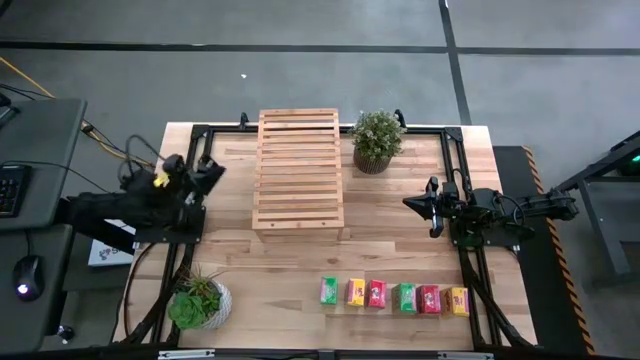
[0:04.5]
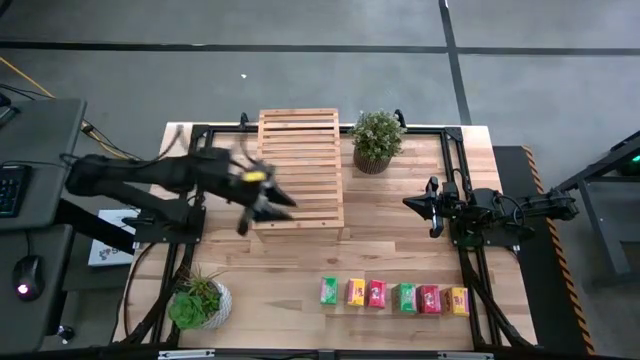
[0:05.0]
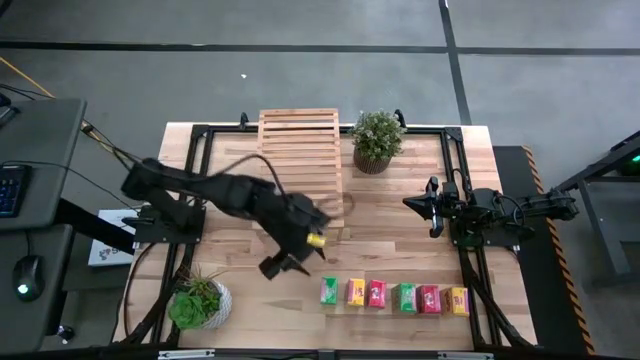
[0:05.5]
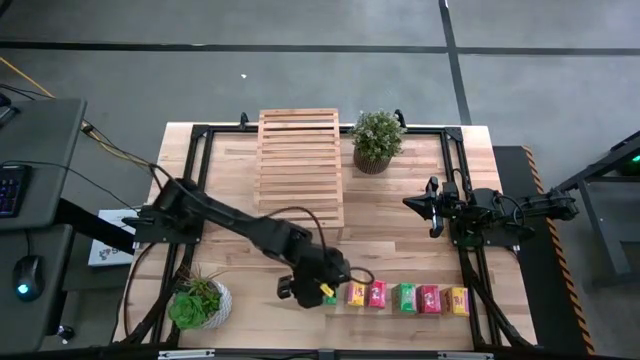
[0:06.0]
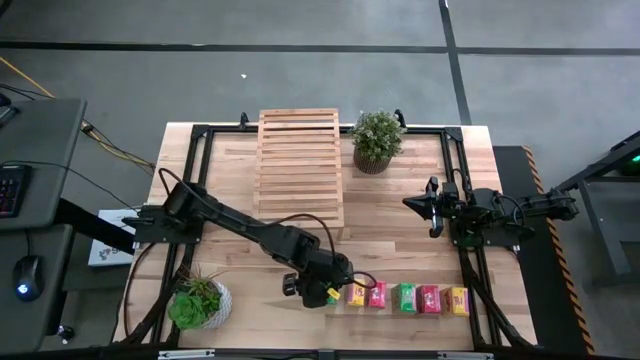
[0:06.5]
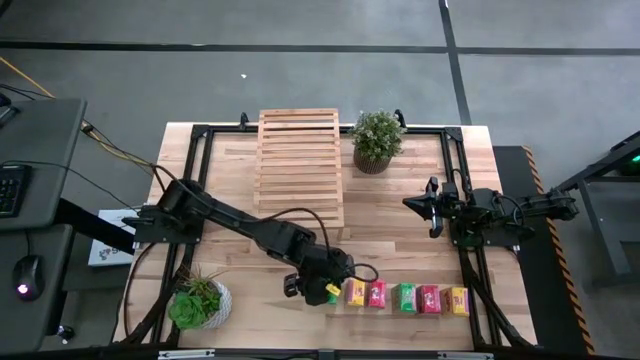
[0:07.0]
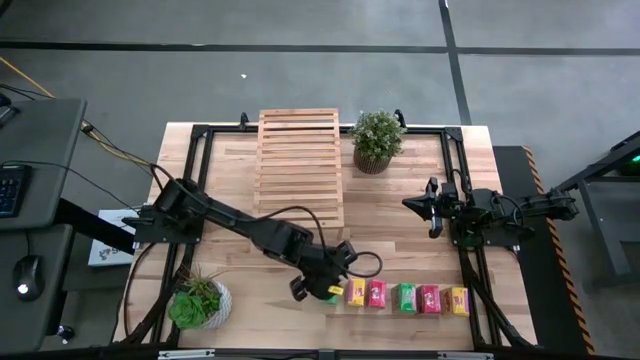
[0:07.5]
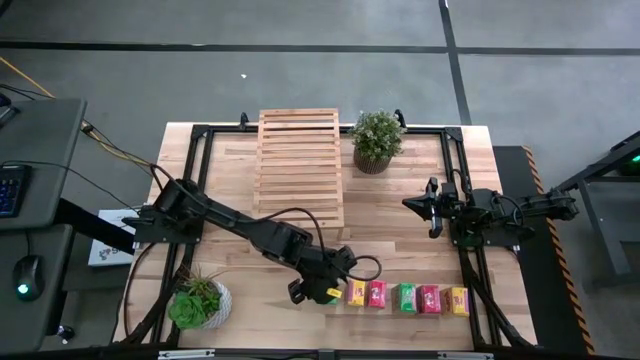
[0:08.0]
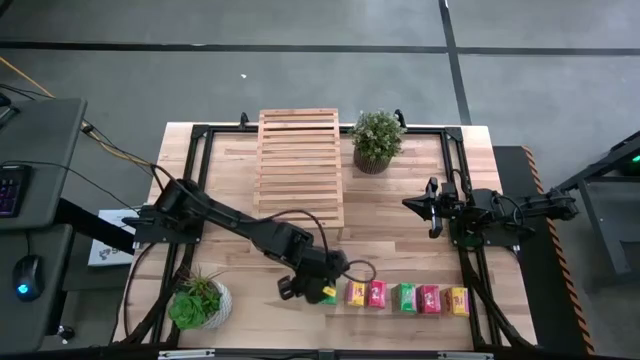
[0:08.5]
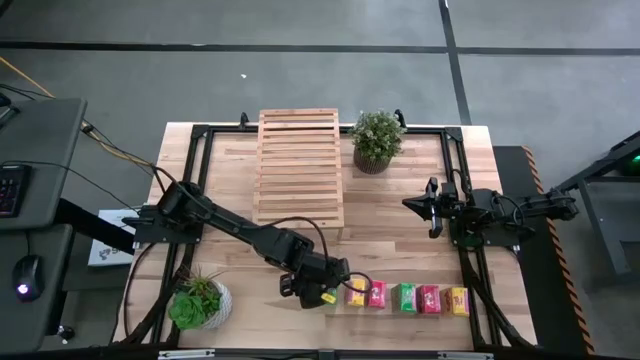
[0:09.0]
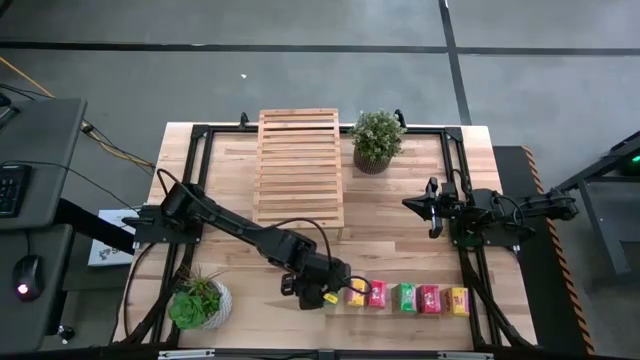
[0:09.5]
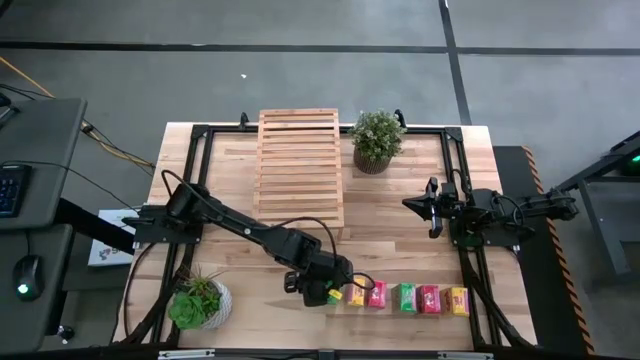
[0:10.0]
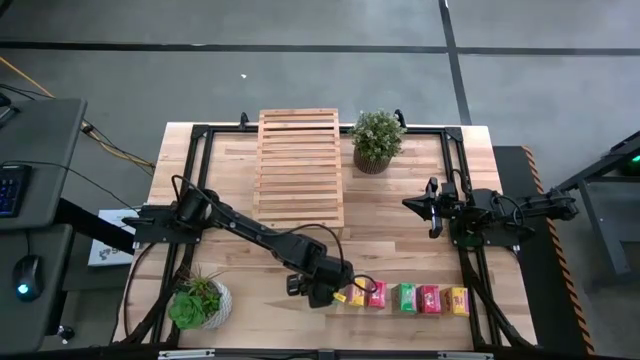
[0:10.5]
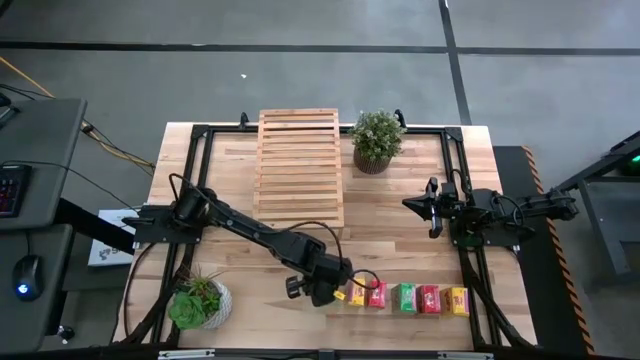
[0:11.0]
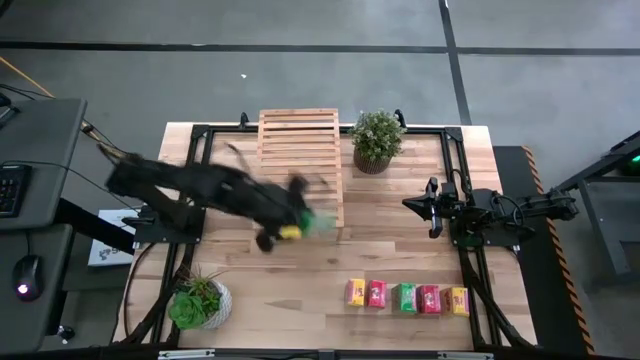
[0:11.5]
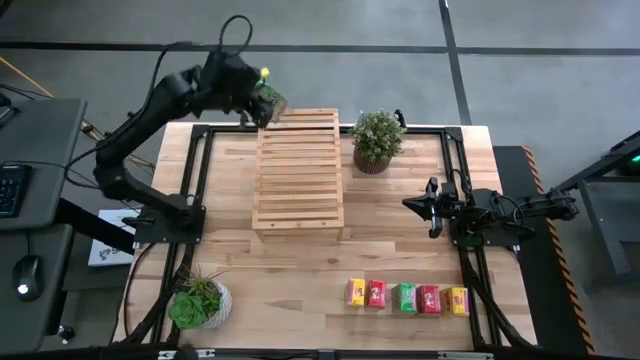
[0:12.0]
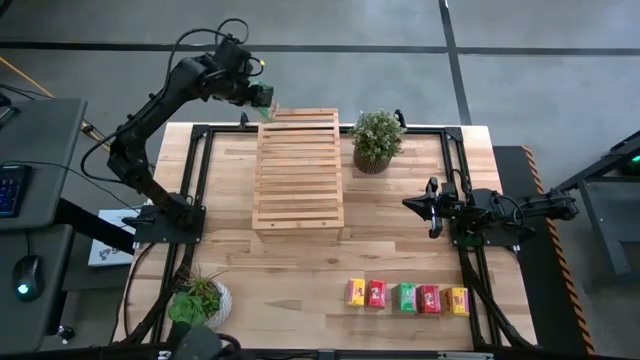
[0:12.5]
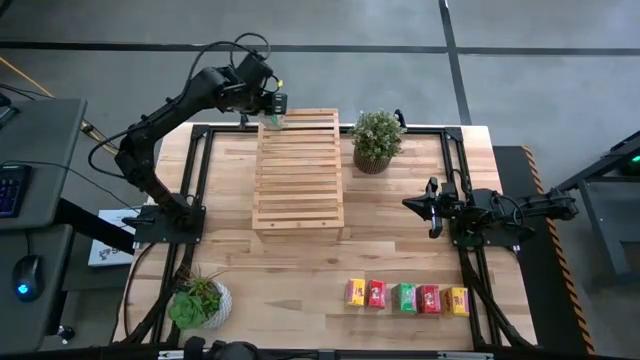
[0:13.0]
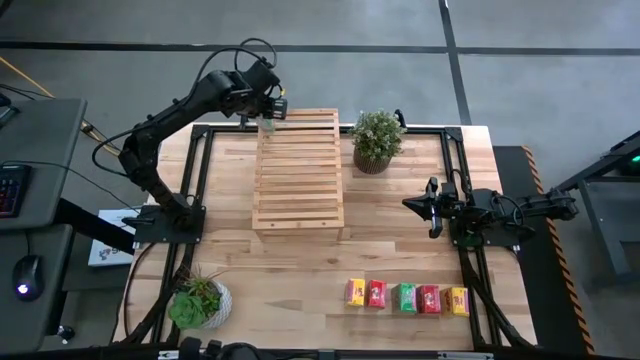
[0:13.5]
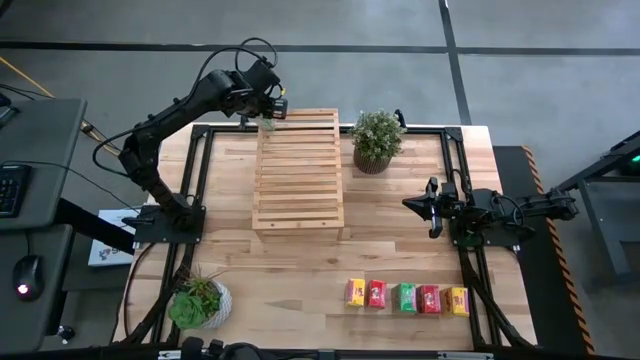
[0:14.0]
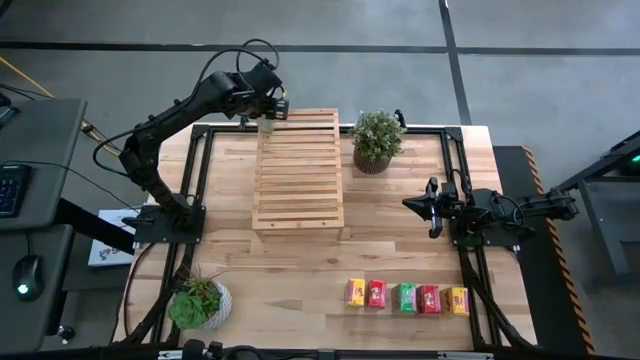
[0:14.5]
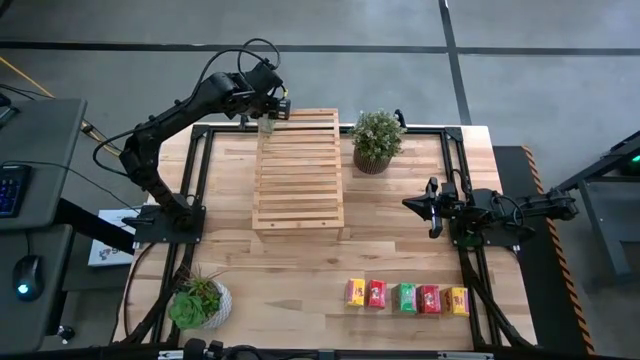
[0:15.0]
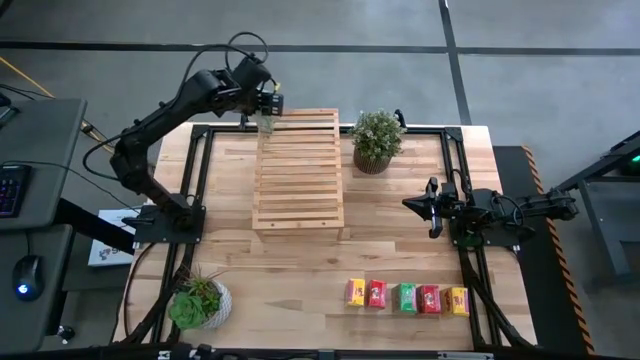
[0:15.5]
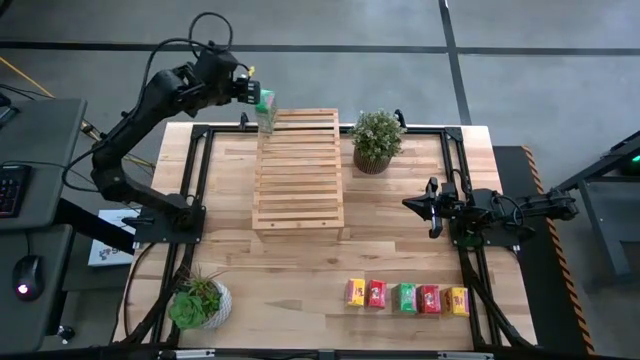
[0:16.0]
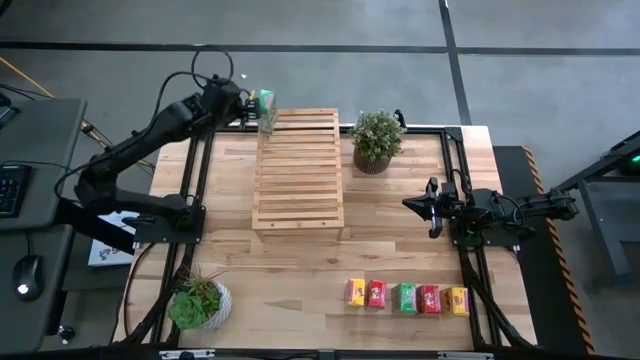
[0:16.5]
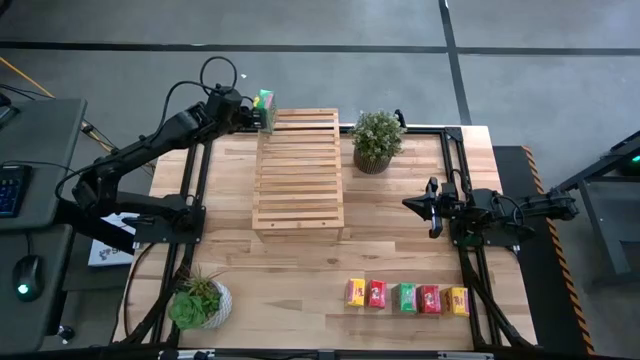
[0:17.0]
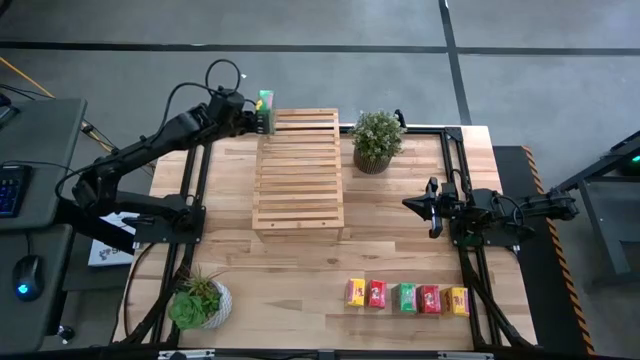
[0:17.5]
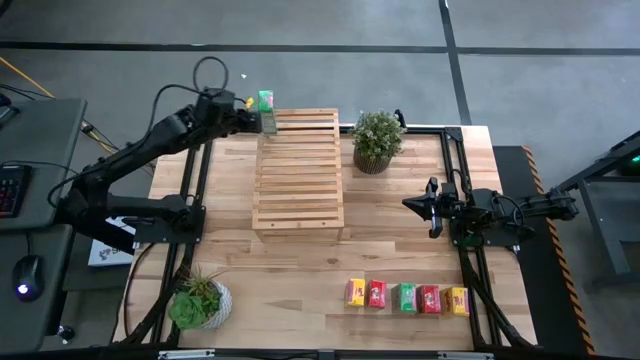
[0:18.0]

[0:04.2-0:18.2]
Task: Stack cereal on shelf
Put the left green cereal box on the shelf
